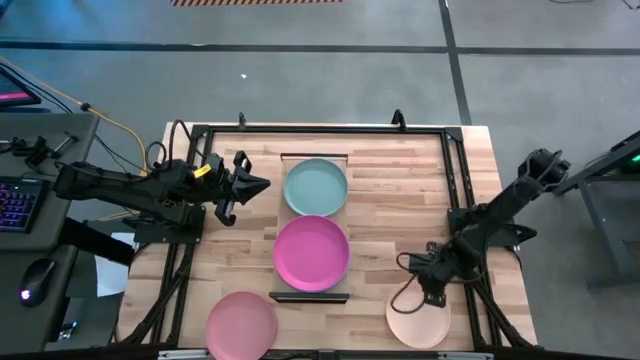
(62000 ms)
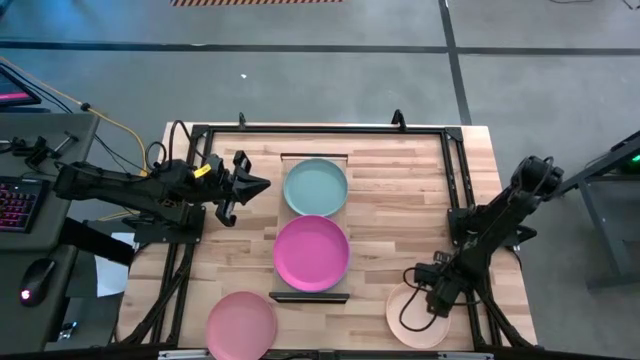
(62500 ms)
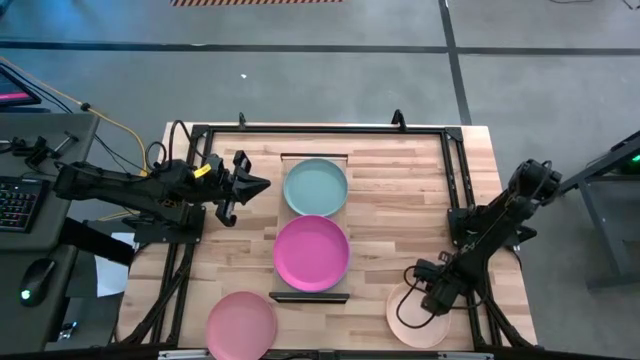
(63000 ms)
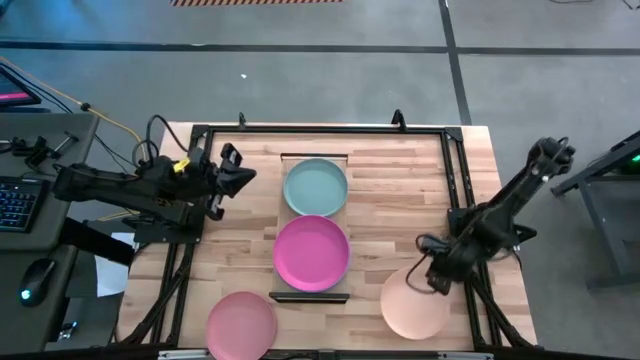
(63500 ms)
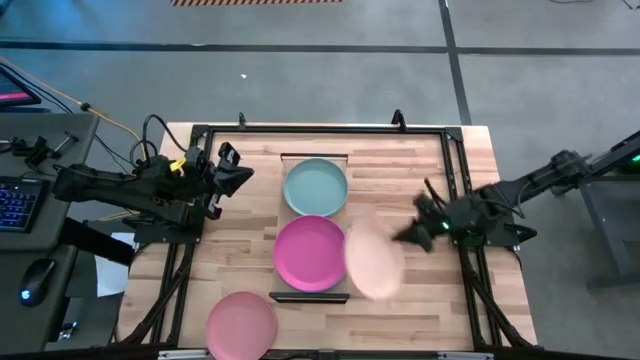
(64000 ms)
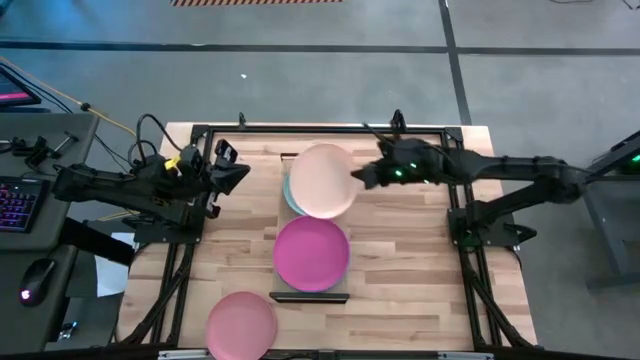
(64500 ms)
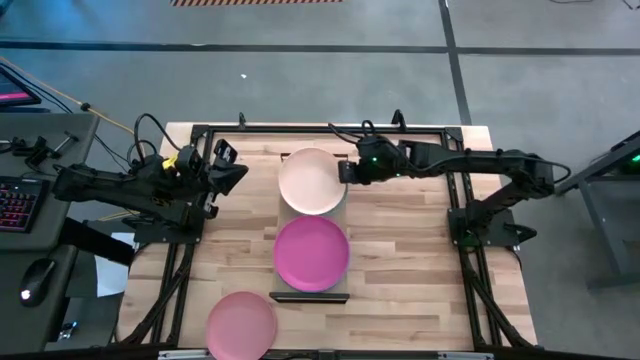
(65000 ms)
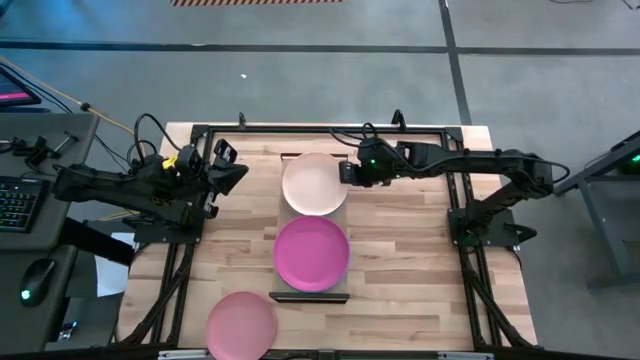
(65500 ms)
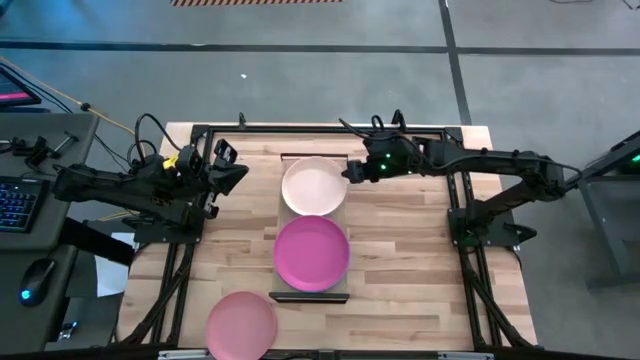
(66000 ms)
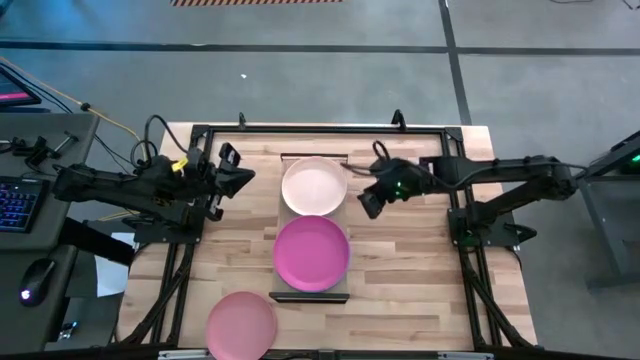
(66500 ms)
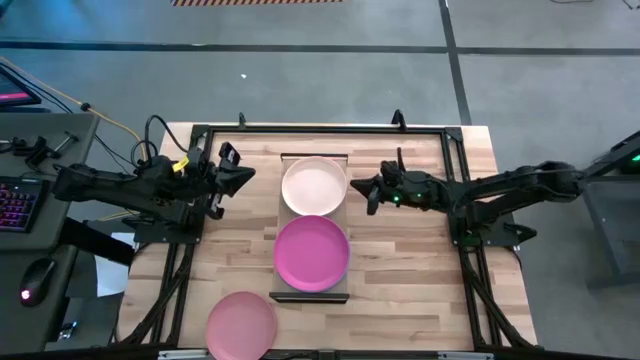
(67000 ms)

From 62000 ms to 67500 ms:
Task: Place and stack plates onto a shelf
Stack the light brown plate on top of the blue plate on the shelf

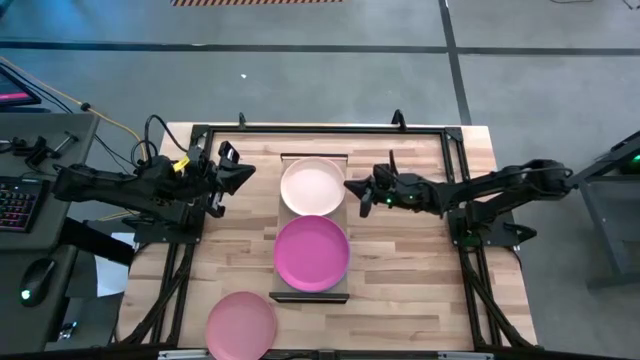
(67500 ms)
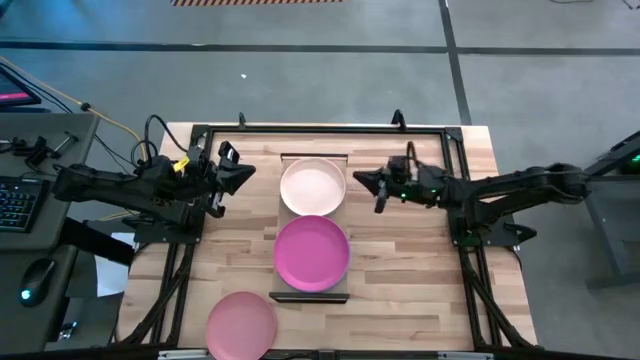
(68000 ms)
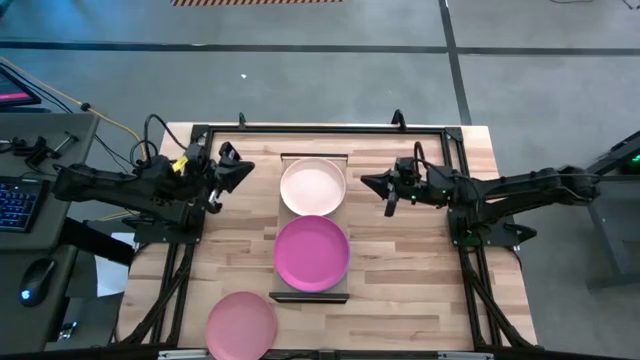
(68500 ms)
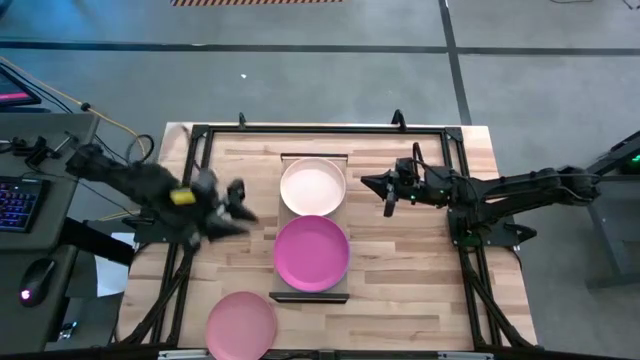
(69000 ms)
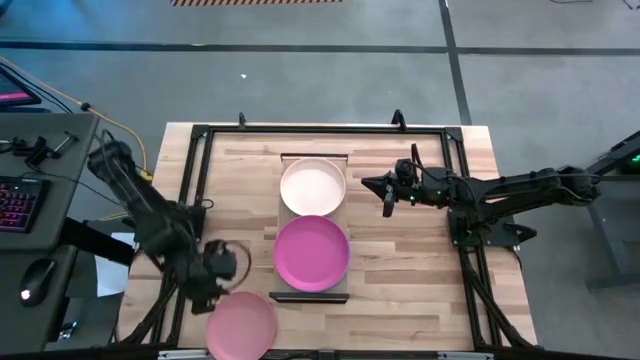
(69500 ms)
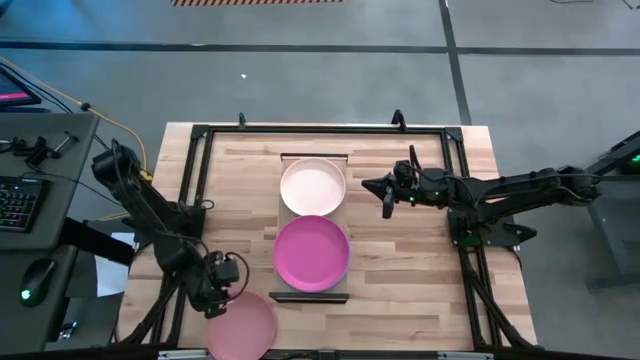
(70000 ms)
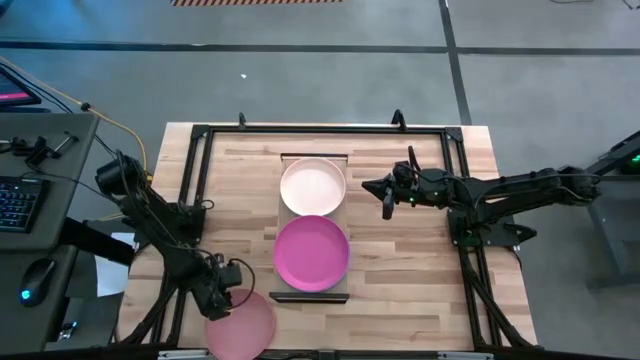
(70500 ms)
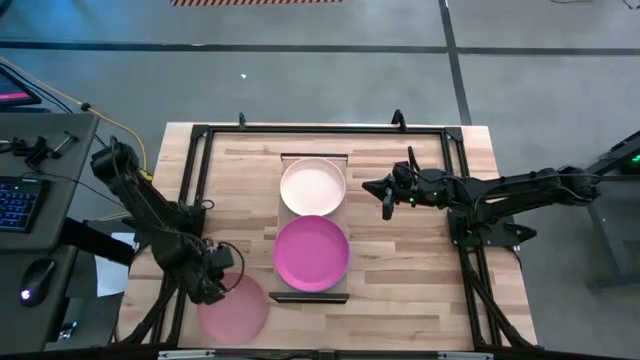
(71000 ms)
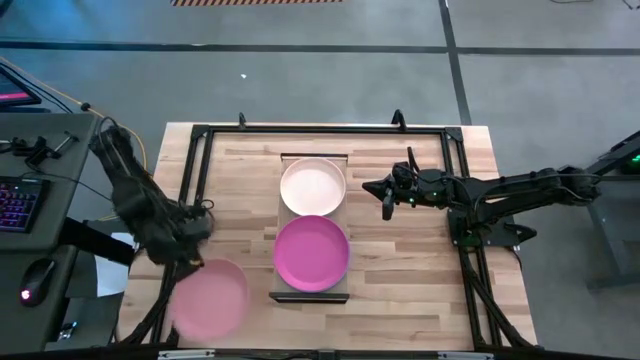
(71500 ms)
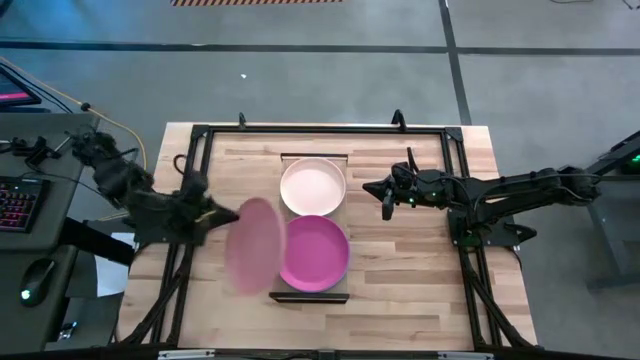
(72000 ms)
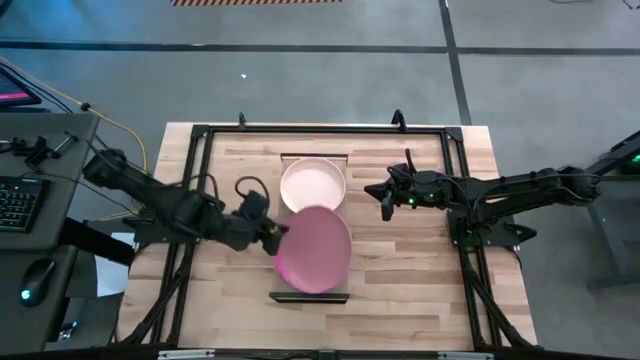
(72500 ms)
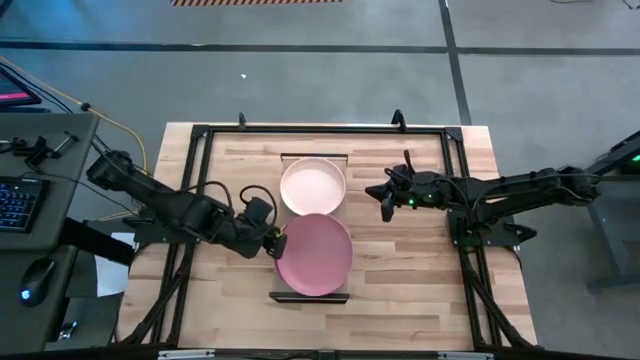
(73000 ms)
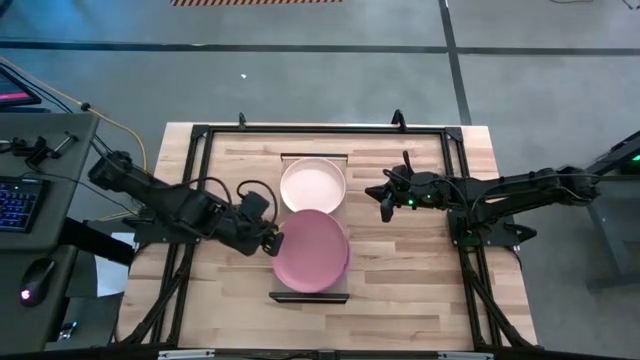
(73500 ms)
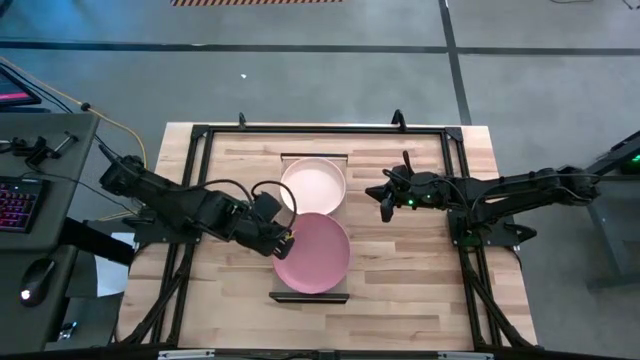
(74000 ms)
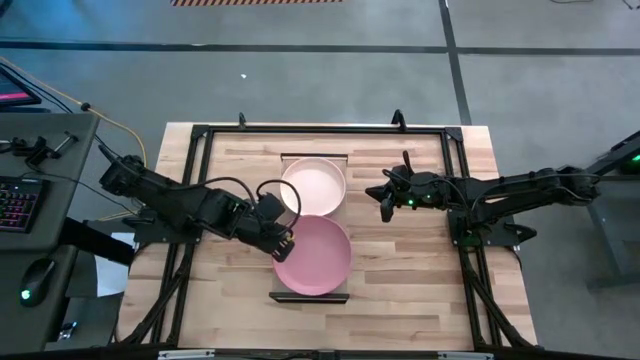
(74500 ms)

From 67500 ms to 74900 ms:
Stack the light pink on the pink plate on the shelf

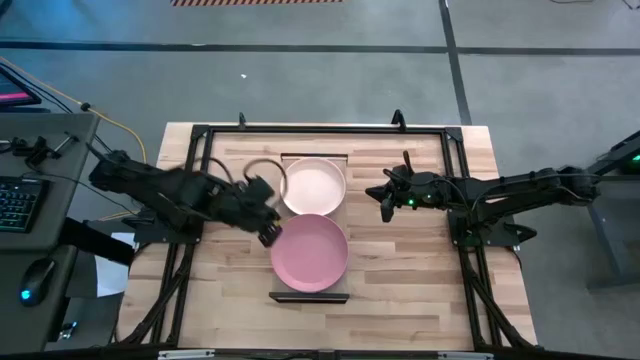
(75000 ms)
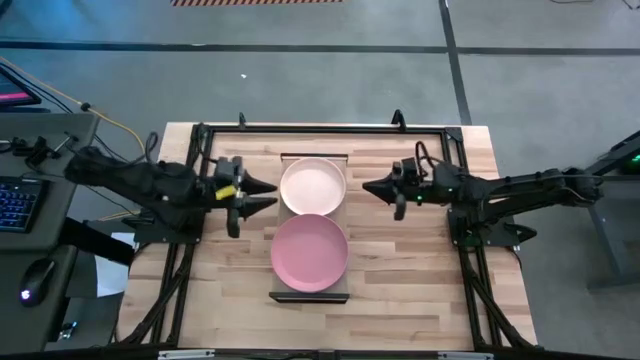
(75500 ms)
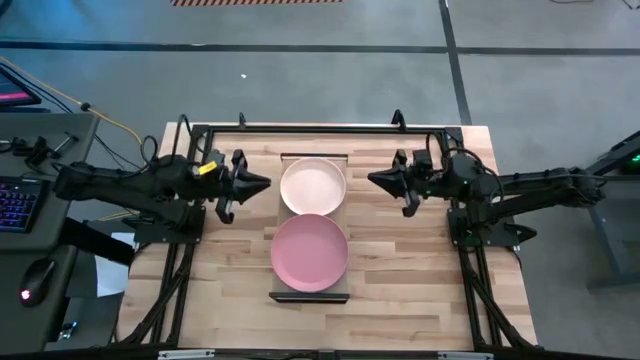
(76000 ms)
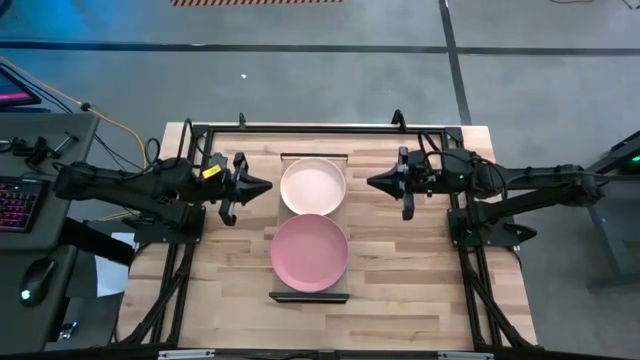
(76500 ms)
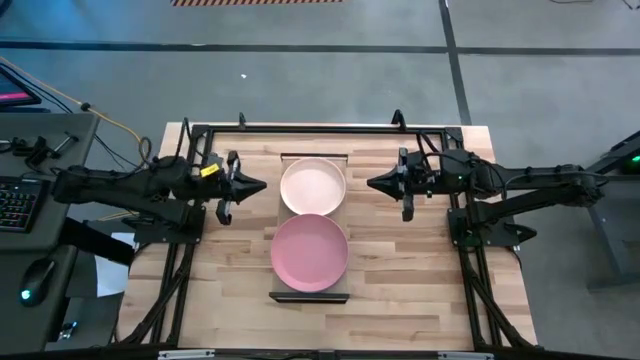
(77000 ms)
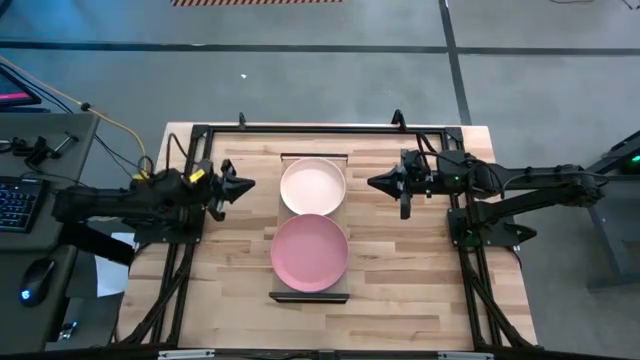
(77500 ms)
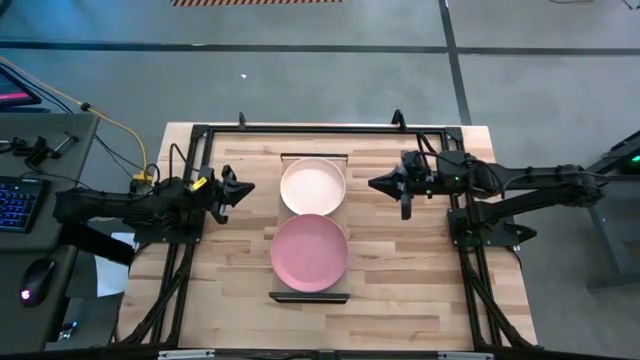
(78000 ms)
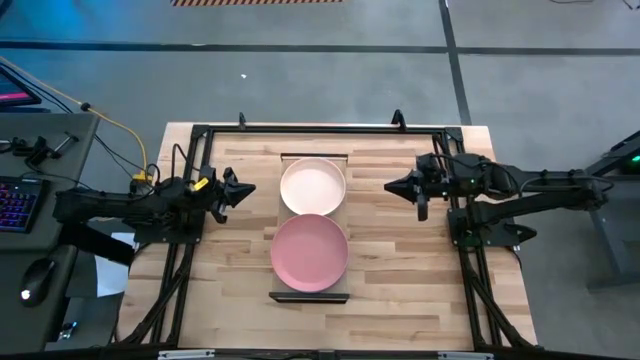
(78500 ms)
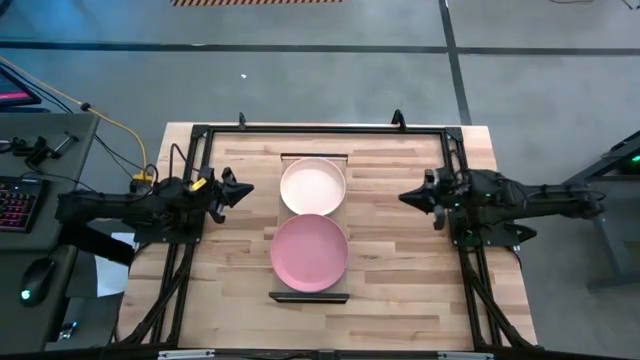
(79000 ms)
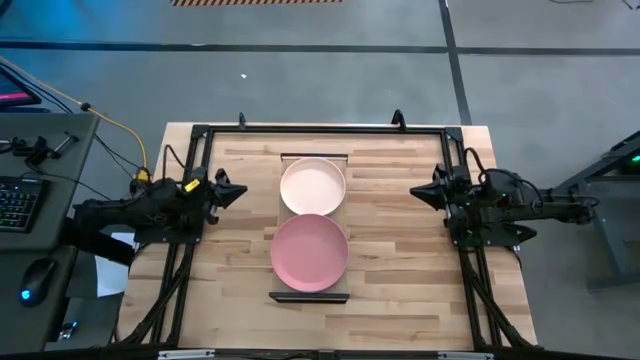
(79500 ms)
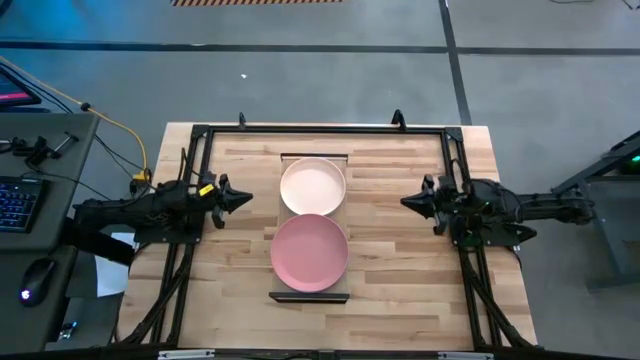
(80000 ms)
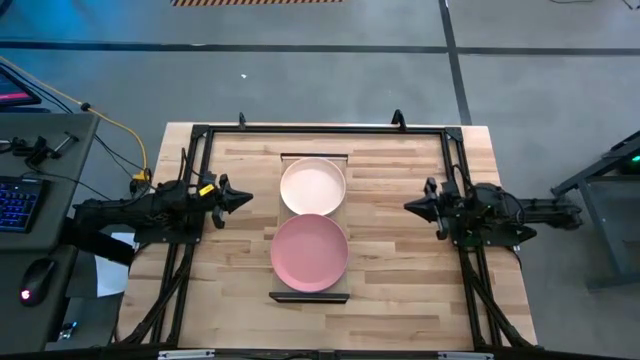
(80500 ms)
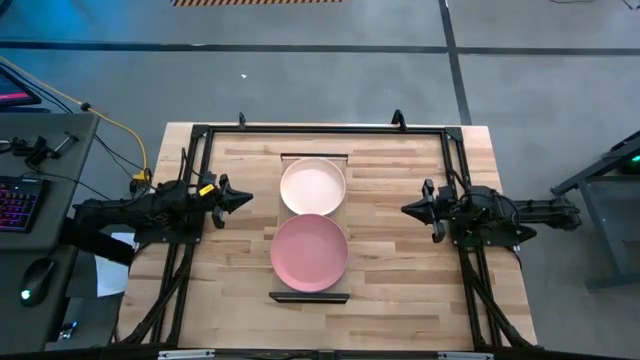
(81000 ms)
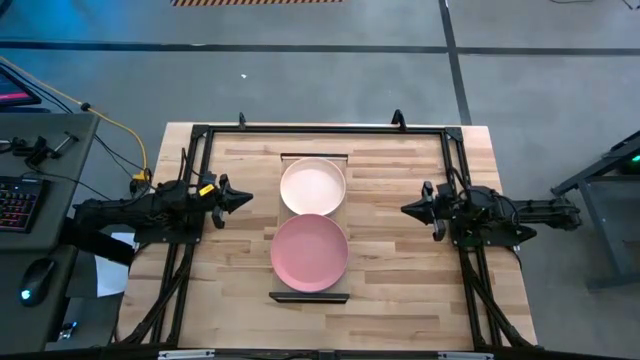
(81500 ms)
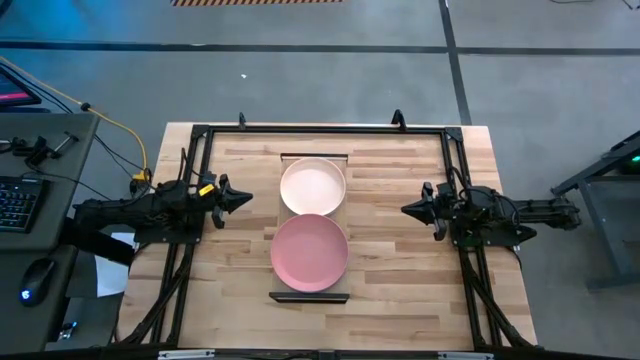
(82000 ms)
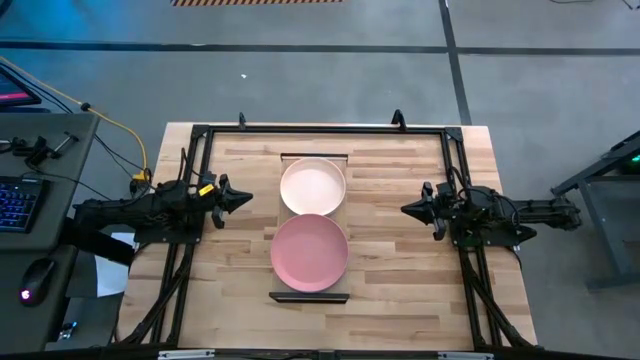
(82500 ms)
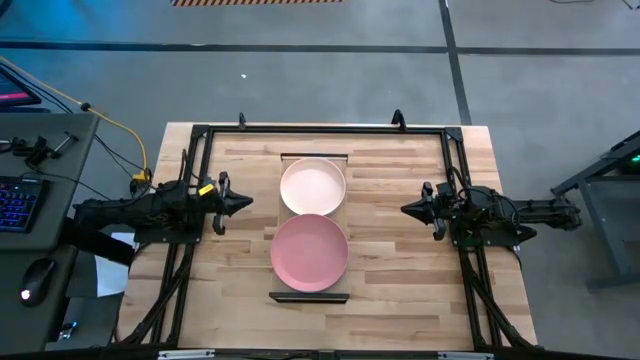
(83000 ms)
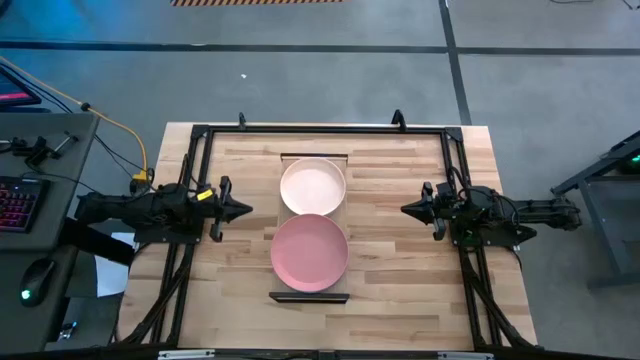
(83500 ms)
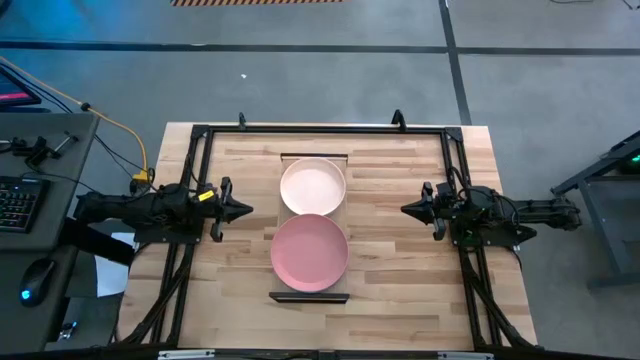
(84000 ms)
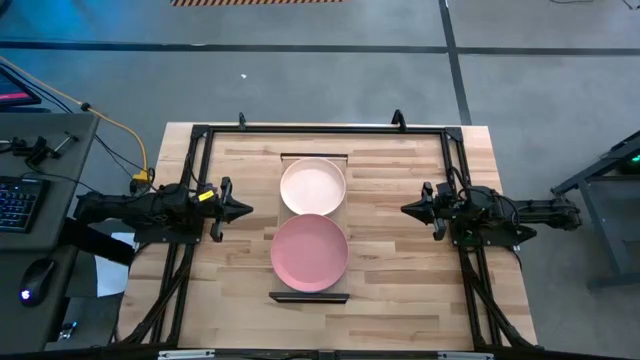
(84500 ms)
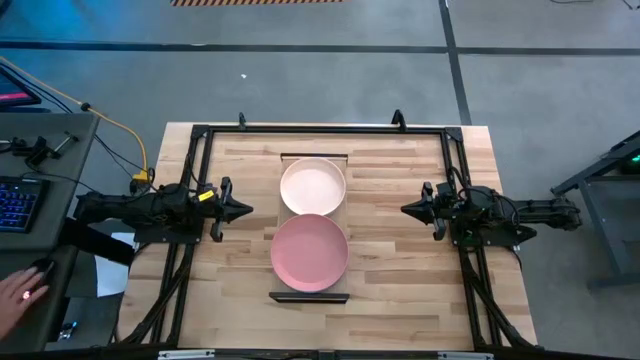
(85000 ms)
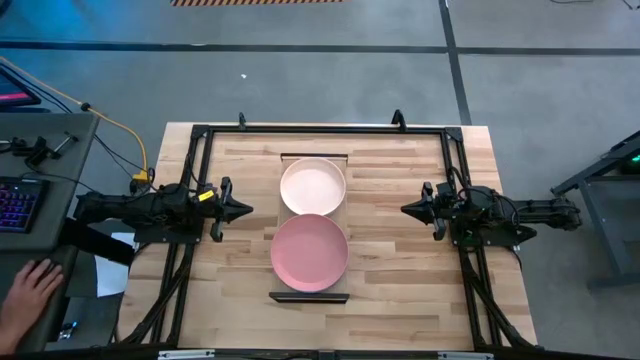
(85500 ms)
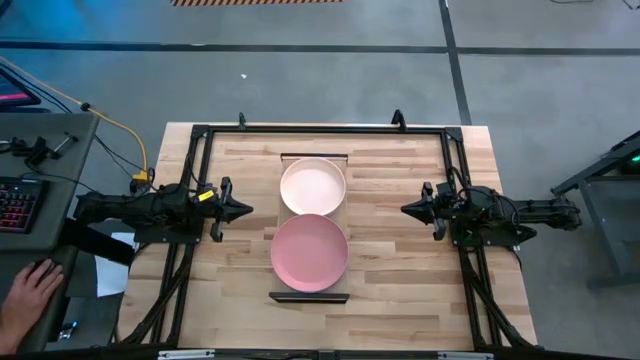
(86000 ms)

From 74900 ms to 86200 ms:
Return to Home Position
